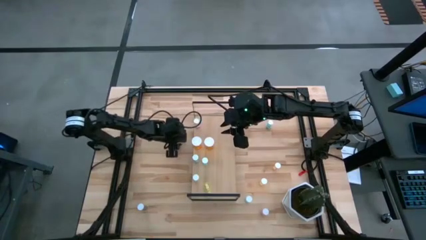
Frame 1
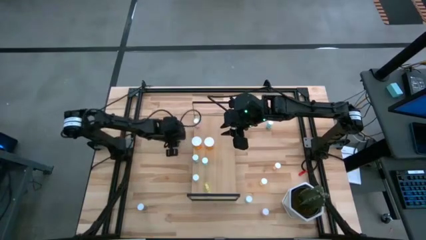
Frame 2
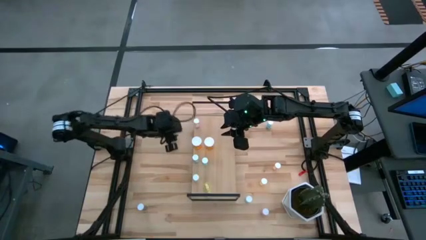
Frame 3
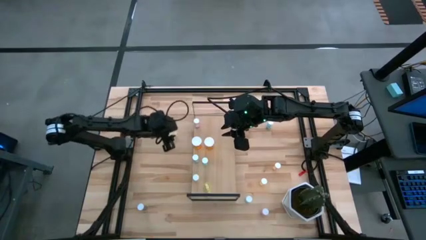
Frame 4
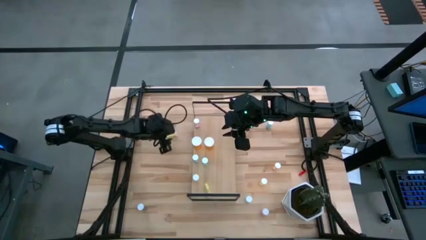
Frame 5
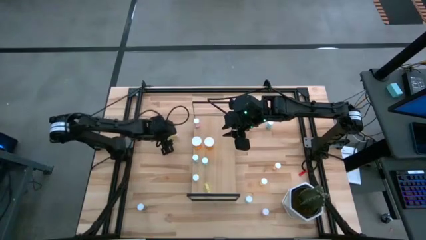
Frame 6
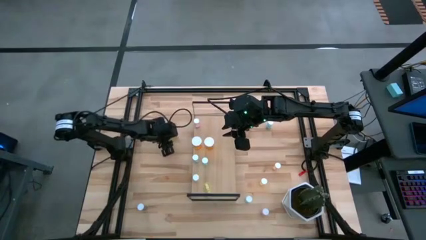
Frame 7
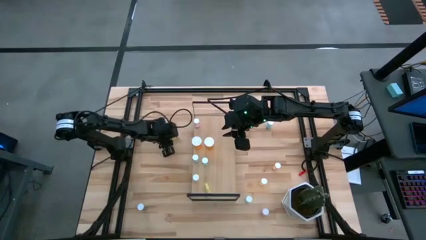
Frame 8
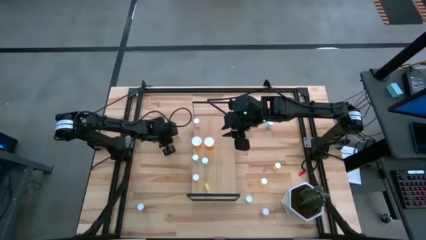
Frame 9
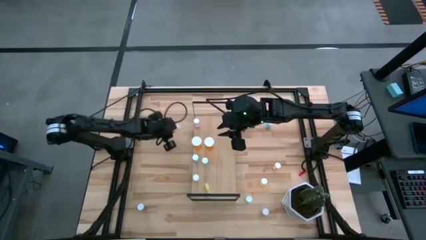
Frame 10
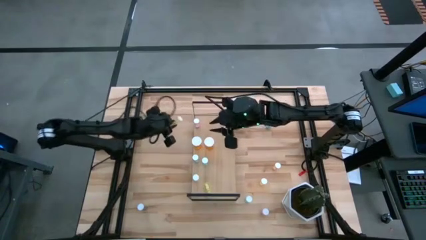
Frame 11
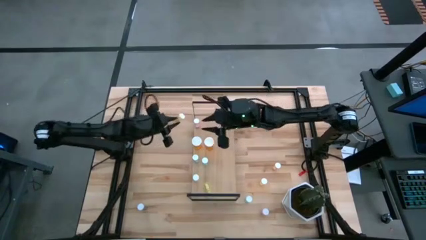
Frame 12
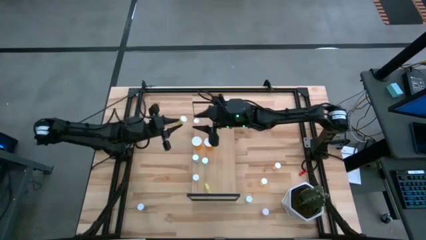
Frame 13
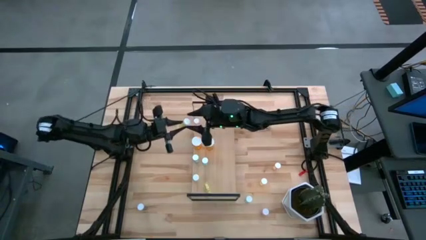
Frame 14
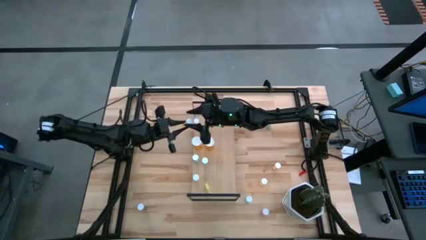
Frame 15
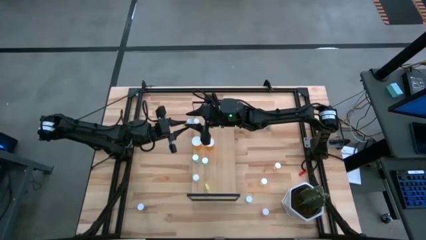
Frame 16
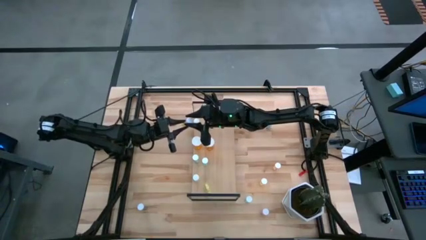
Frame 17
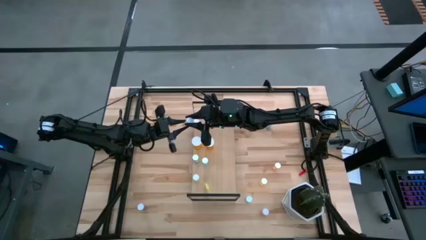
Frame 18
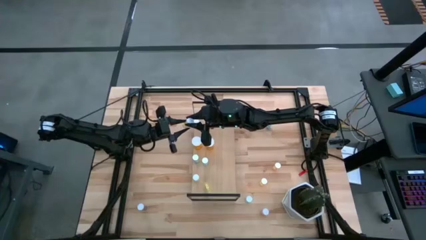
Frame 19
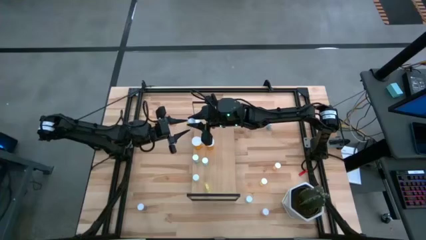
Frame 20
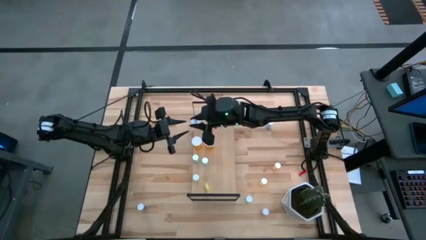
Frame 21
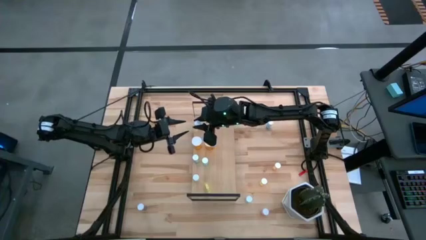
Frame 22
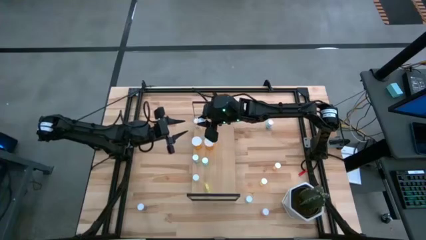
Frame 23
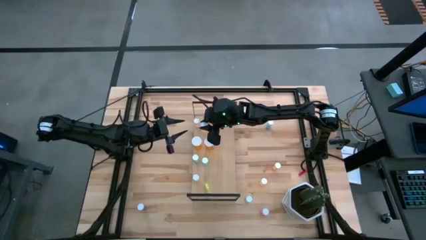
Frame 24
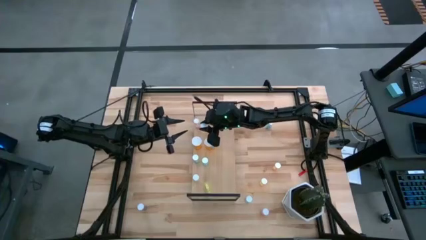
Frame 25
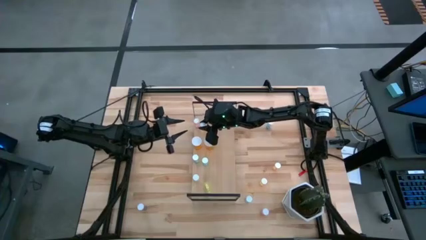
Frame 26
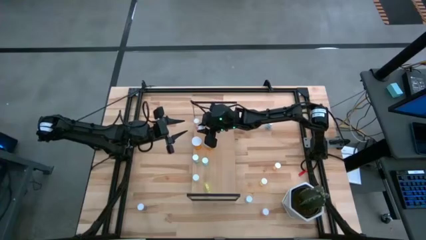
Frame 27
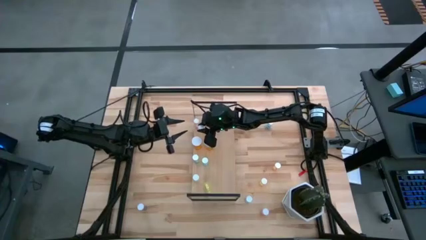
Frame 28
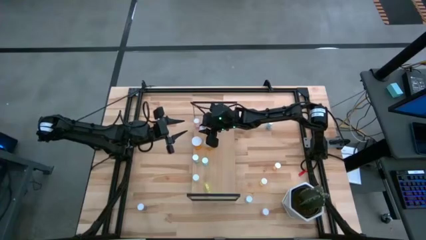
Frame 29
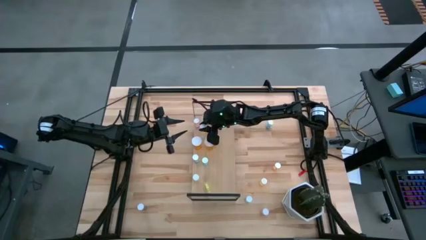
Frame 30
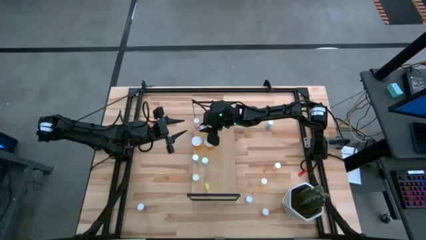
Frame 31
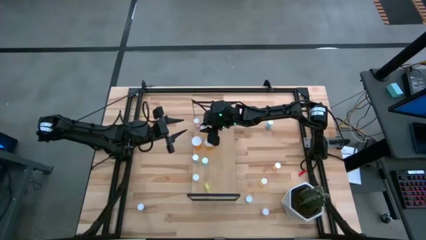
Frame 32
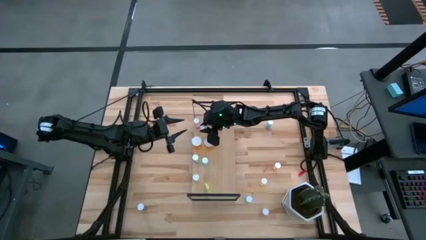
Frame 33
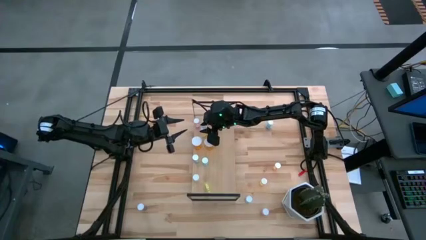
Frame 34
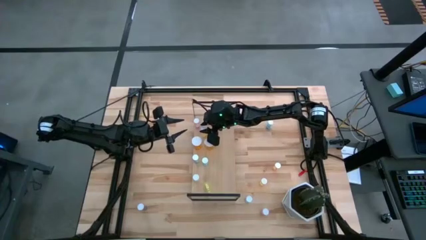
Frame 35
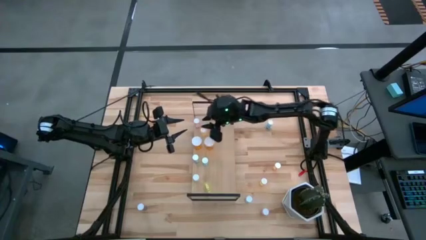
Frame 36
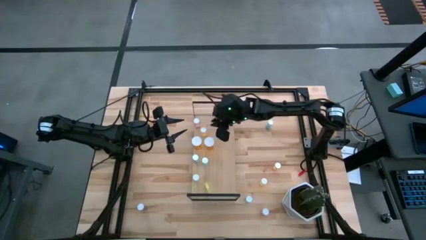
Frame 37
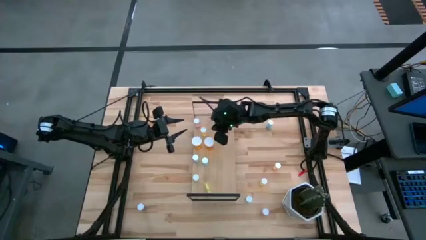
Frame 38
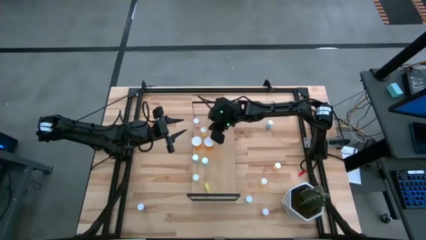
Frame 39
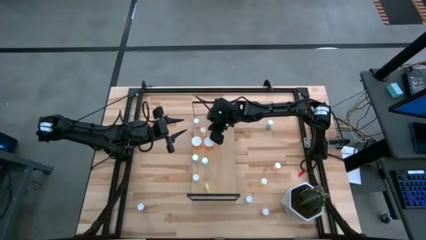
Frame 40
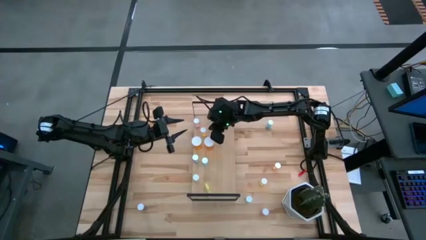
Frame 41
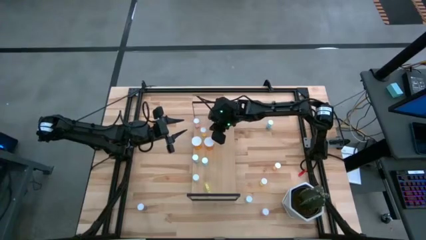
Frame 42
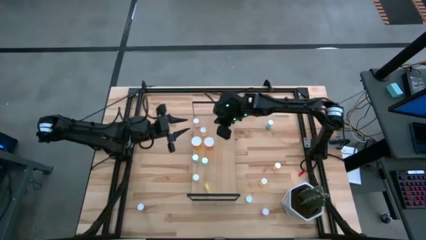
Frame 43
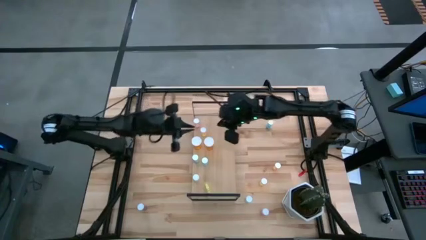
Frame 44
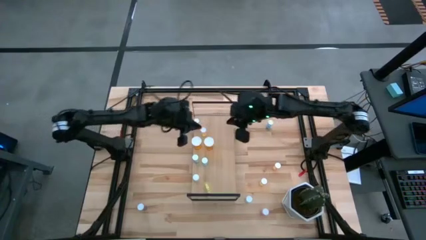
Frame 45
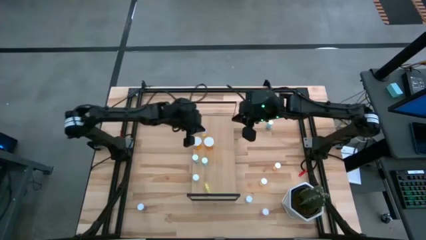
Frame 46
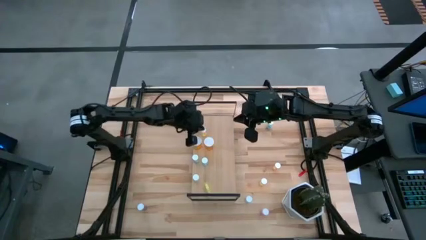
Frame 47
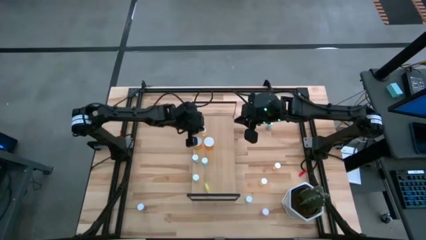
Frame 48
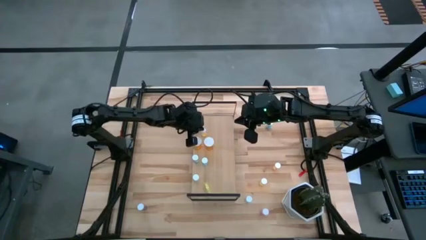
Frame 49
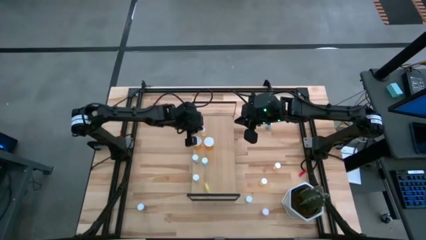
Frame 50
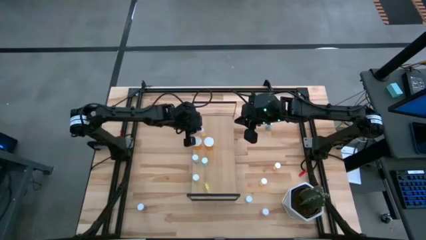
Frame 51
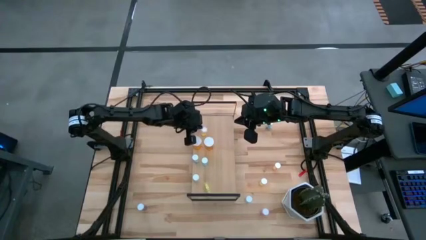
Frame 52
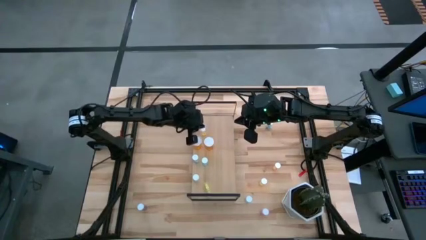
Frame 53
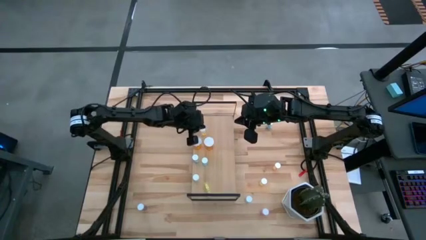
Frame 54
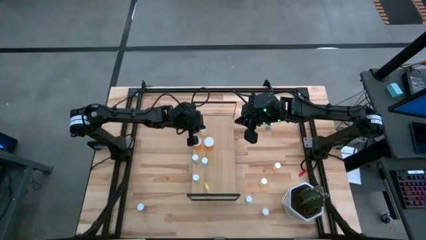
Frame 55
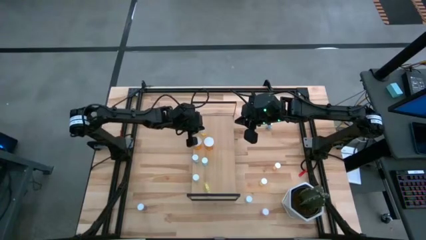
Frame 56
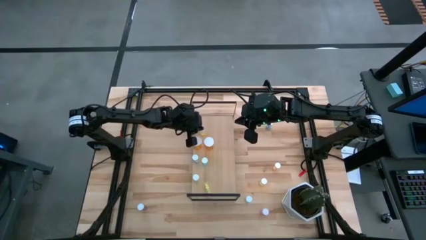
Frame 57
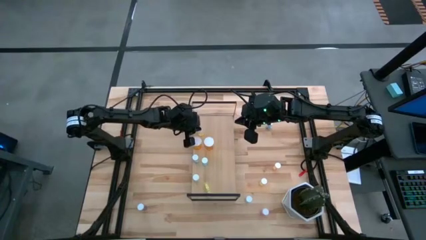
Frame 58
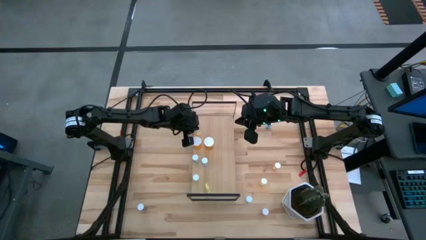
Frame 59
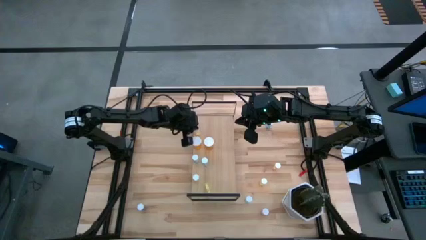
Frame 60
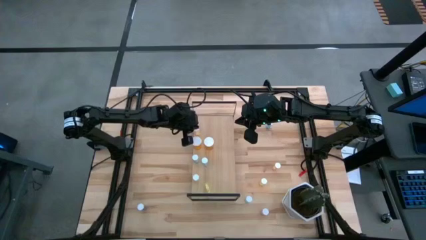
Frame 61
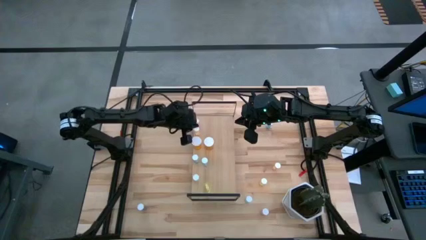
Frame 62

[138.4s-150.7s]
Task: Pick and place medicine bottles onto shelf by color
Put the yellow pill bottle on the shelf

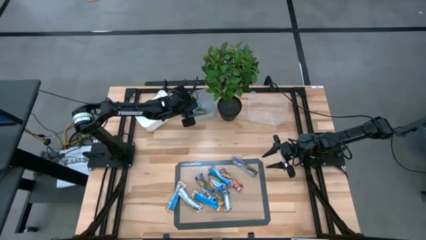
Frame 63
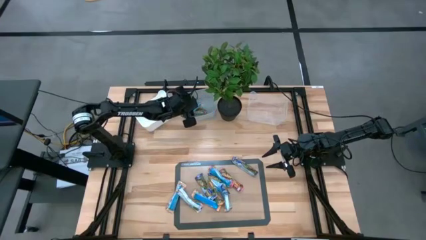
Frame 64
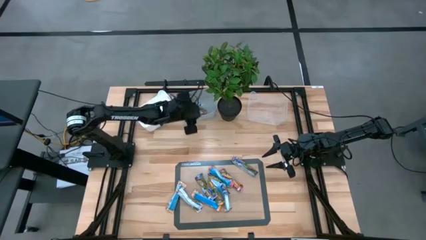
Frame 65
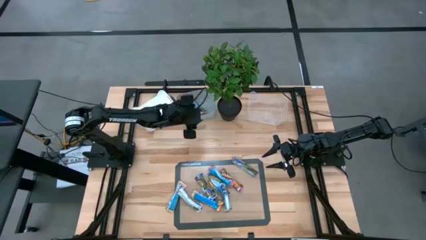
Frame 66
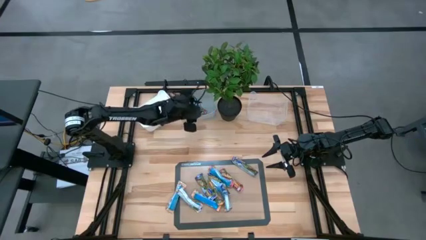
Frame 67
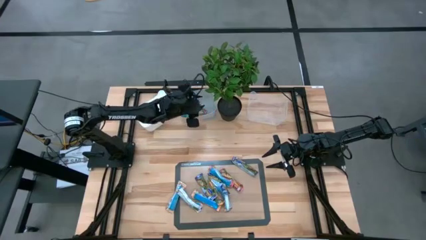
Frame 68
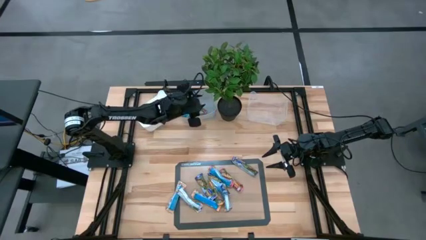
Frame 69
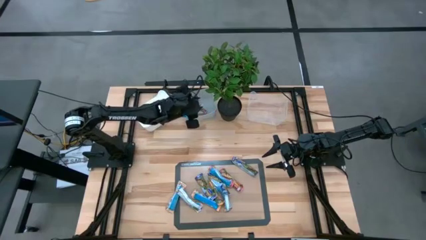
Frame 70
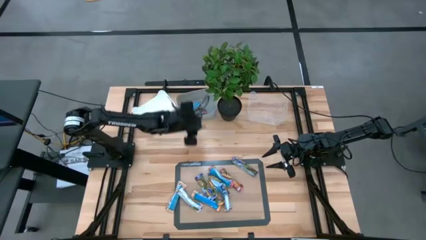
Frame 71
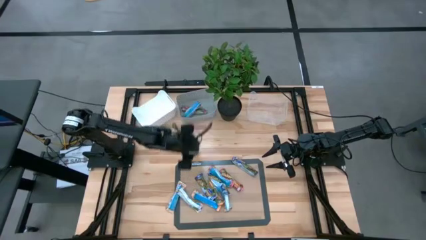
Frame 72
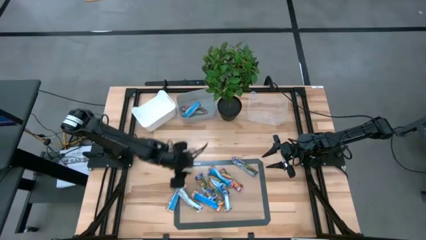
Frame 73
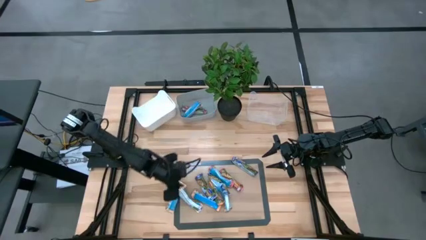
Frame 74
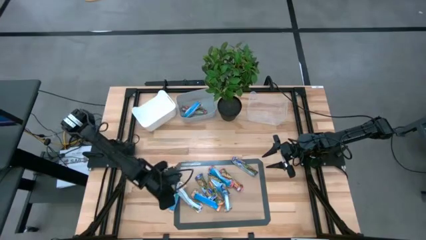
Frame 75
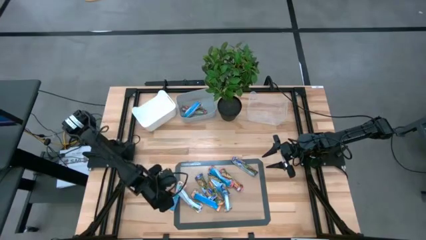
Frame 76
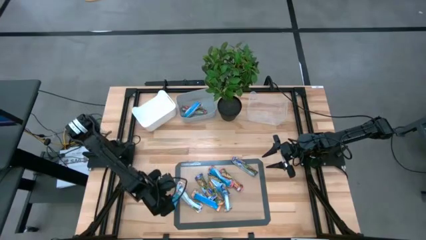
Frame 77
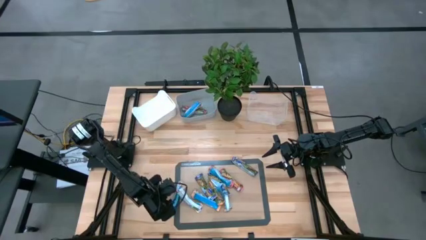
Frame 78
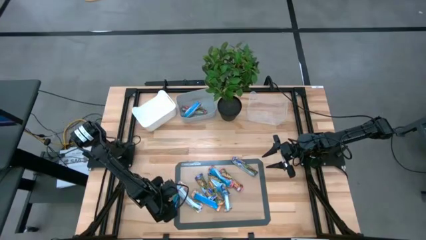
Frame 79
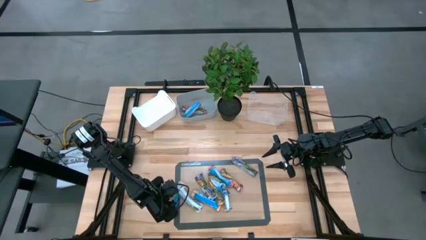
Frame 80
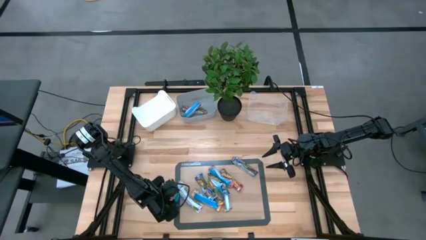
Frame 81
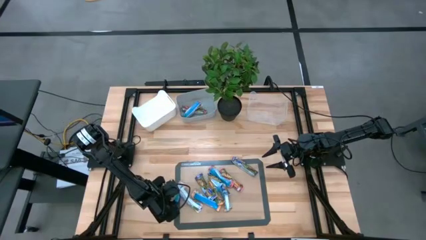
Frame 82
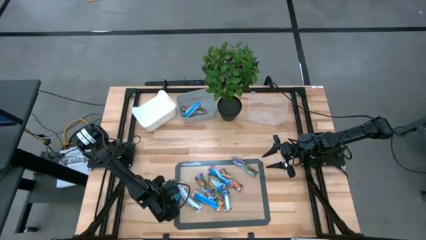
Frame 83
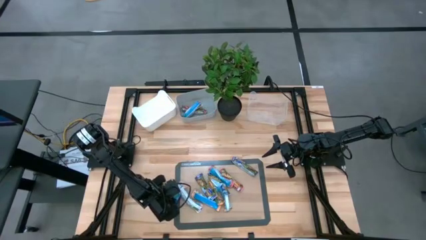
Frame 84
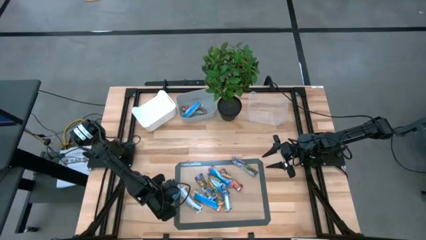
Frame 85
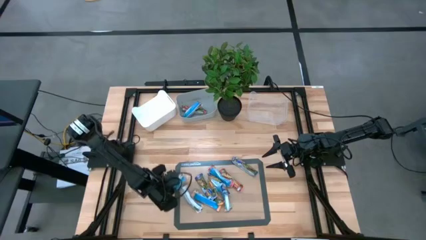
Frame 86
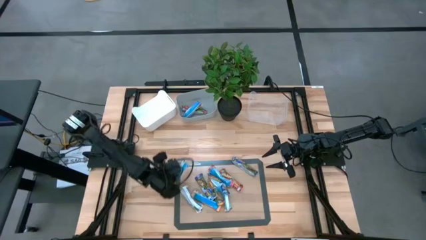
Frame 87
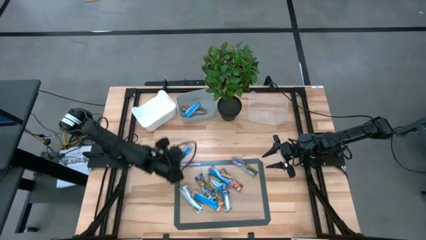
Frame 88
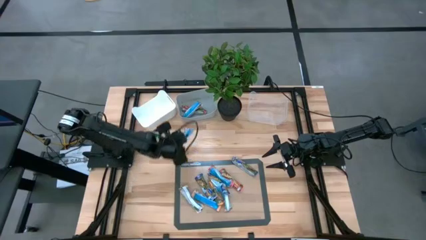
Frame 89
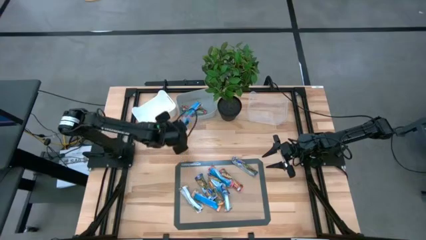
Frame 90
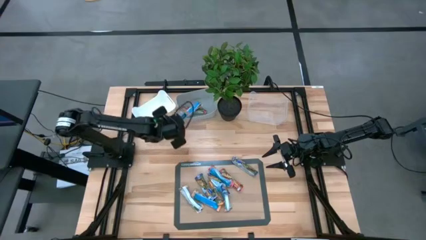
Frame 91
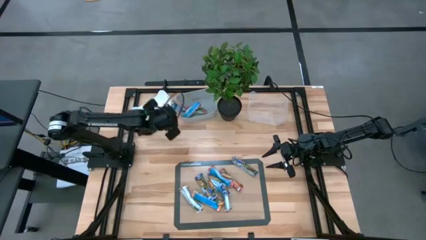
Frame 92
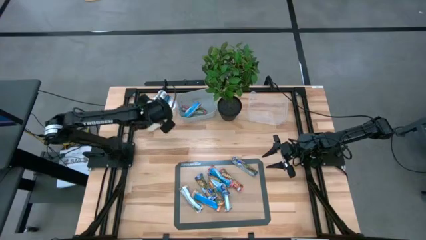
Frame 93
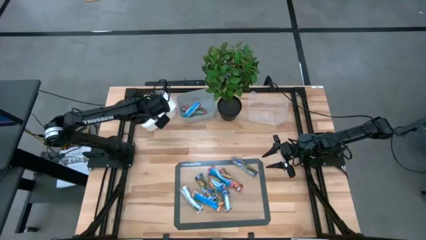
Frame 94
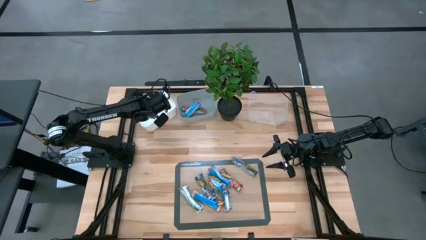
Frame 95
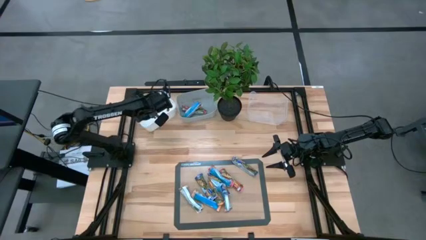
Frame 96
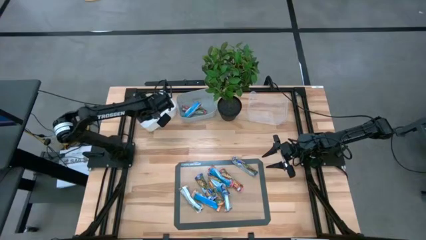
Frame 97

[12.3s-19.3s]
Task: Pick and place Granola Bars by type
Put the yellow granola bar into the white bin
